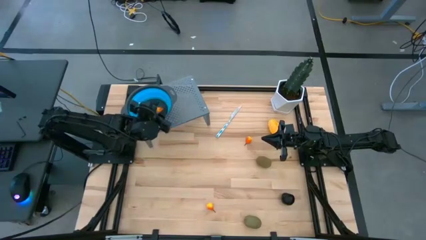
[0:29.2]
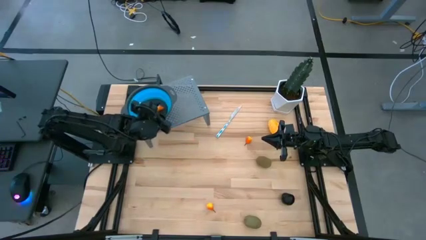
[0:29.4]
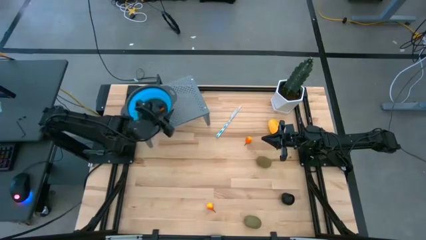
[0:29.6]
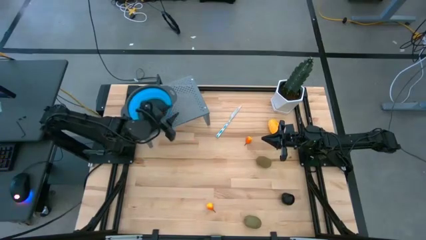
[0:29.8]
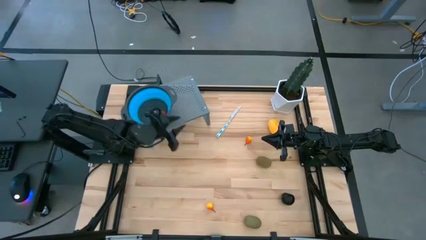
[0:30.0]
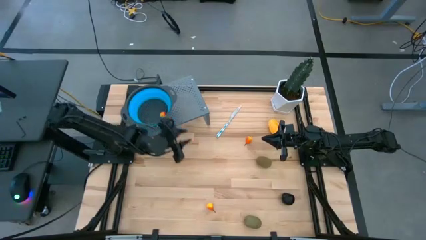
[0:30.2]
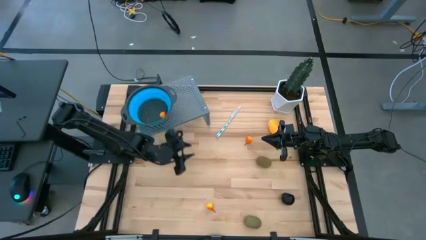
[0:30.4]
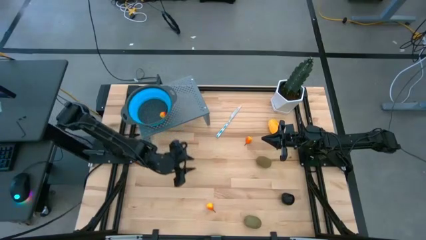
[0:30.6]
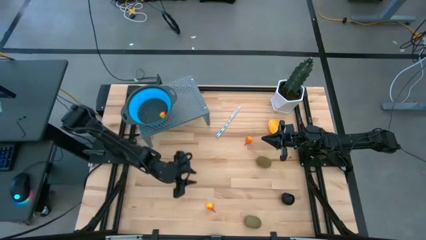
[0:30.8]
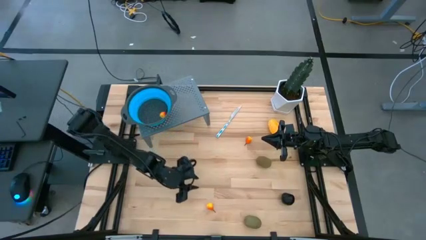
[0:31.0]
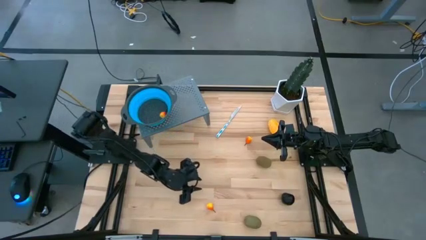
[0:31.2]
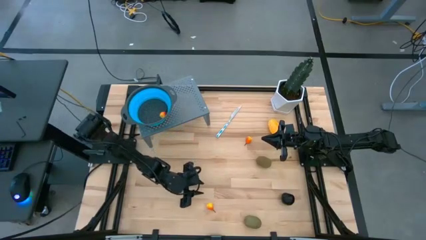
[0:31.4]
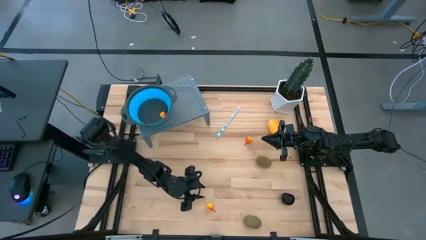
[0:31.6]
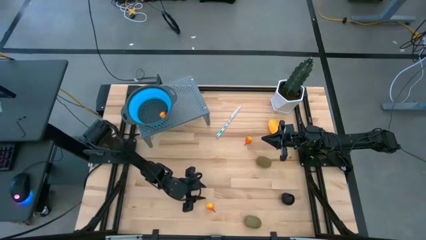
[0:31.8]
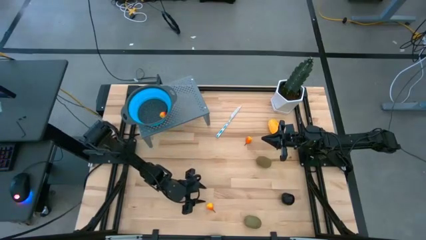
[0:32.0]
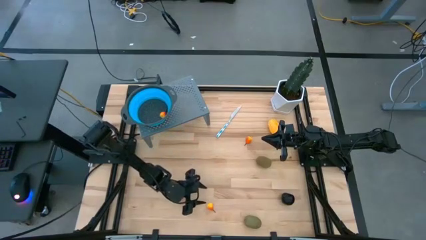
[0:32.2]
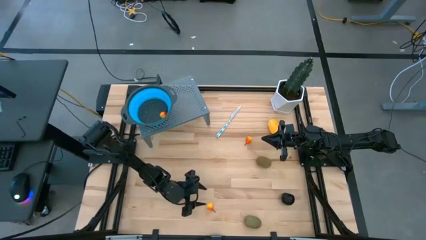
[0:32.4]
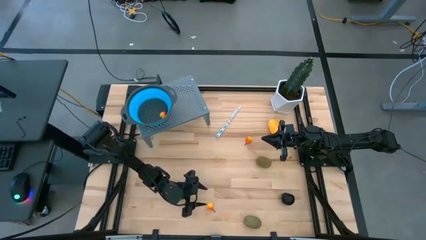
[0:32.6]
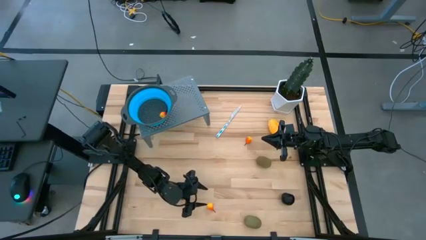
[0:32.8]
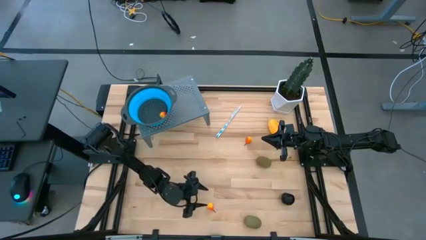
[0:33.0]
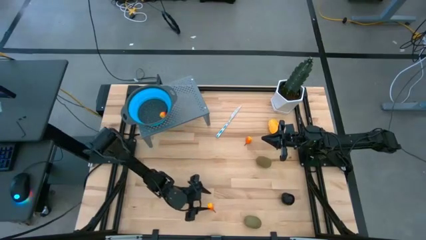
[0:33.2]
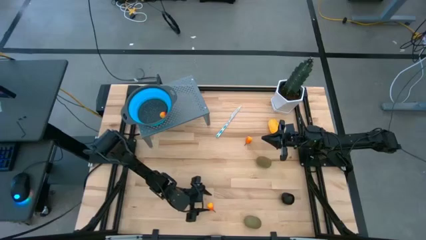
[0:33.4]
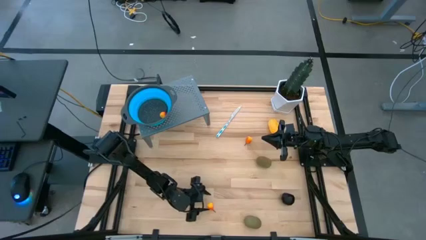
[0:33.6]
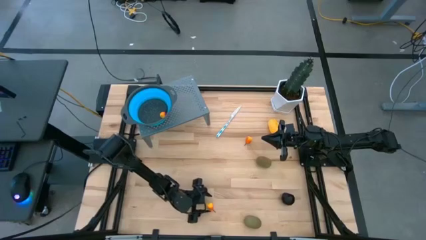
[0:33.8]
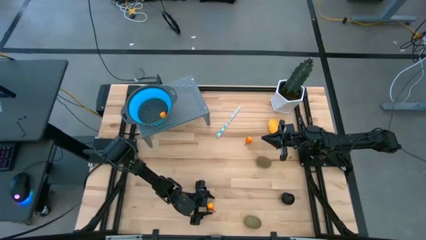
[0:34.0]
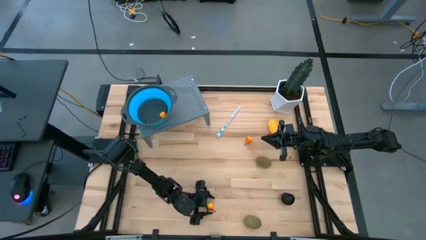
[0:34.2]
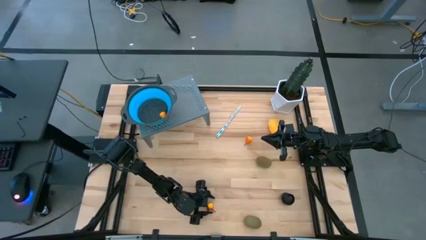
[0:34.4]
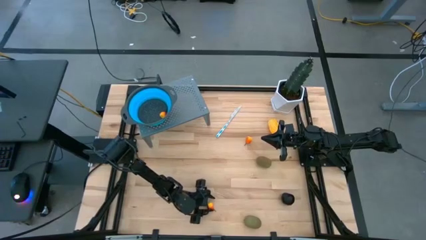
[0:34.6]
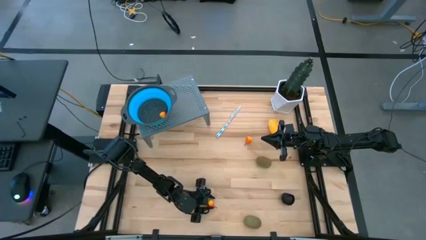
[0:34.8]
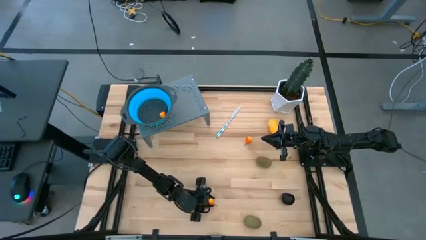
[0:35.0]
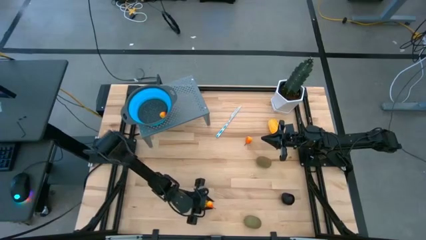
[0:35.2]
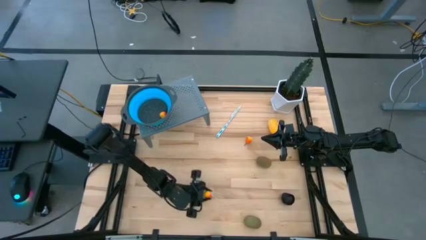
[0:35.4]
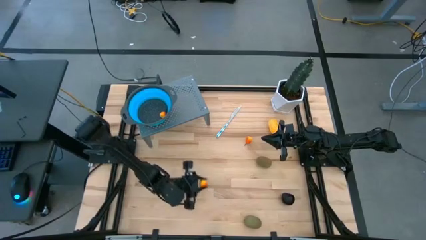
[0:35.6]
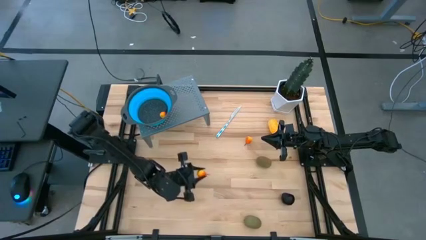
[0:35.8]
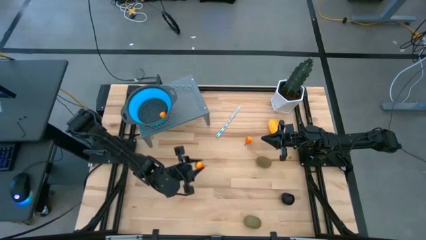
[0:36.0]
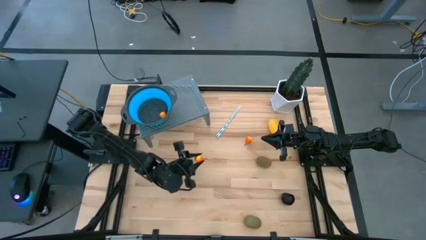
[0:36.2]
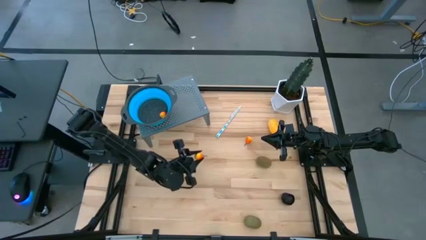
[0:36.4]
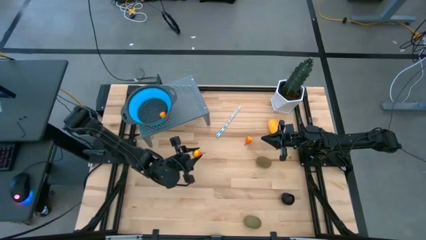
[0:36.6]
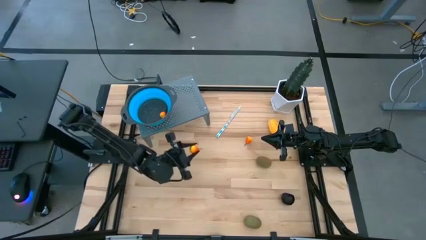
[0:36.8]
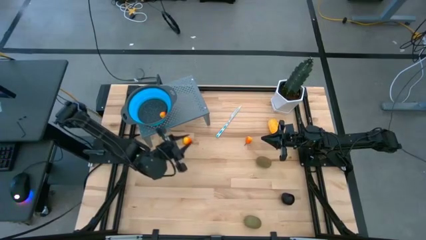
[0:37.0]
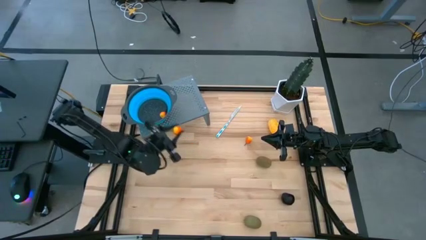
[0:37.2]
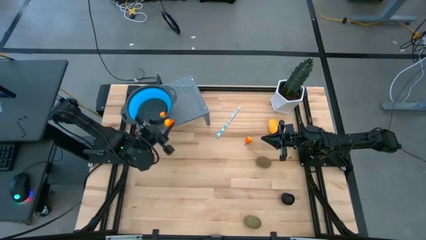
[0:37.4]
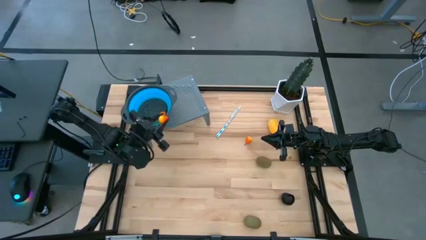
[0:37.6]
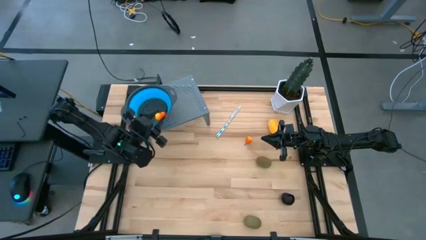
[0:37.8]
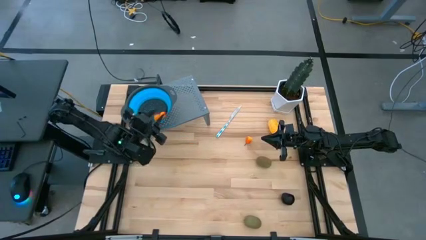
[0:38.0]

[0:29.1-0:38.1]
Task: Pick & Place Fruit
Put the bottom orange pear into the blue strainer bowl

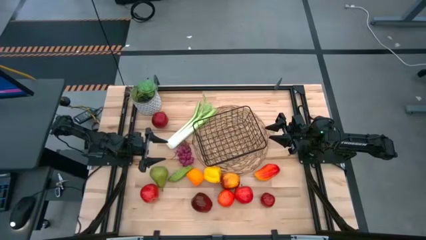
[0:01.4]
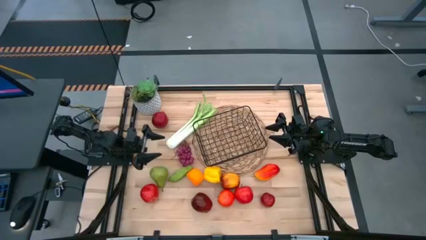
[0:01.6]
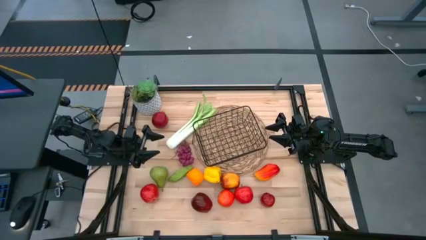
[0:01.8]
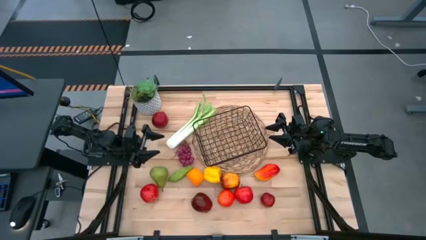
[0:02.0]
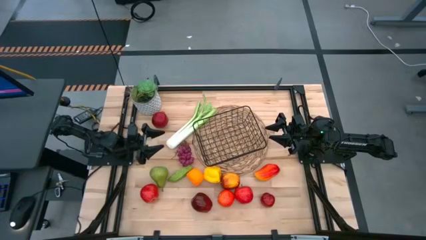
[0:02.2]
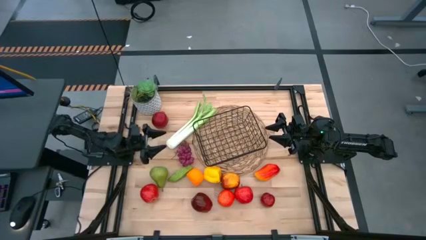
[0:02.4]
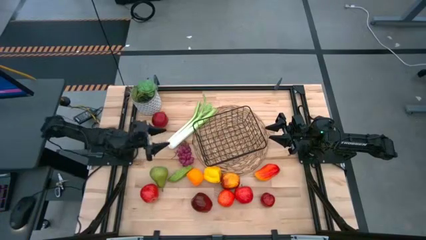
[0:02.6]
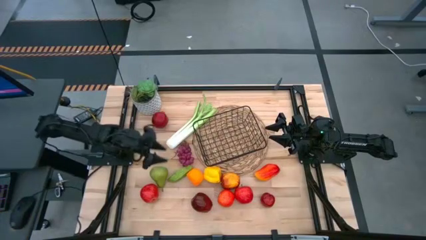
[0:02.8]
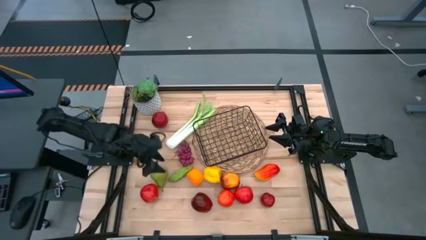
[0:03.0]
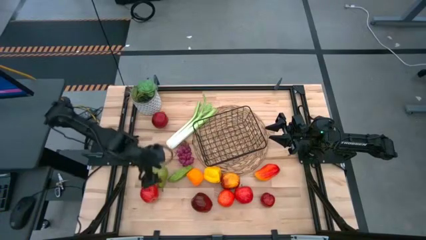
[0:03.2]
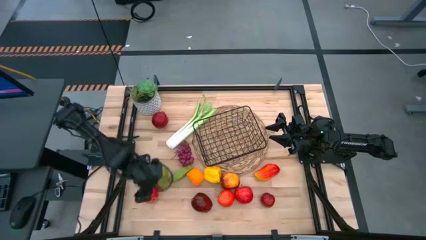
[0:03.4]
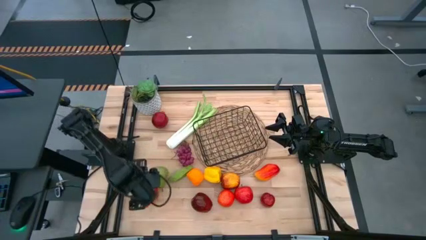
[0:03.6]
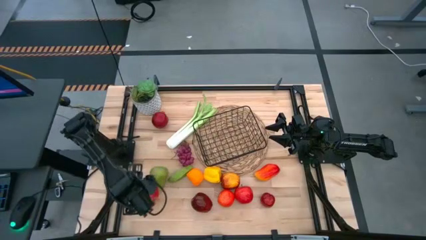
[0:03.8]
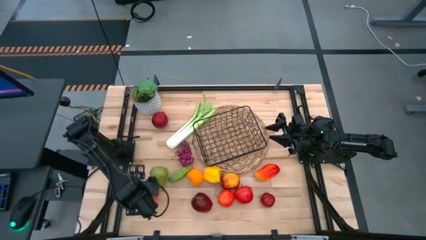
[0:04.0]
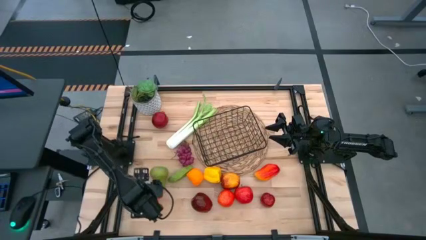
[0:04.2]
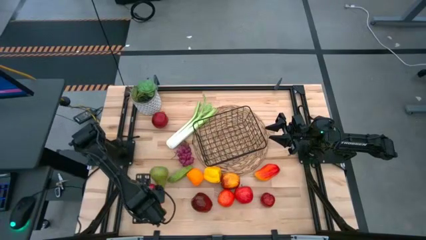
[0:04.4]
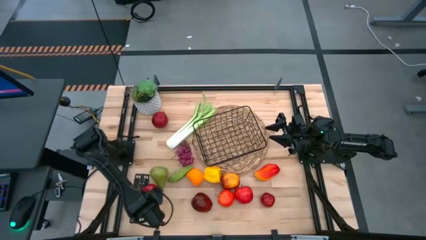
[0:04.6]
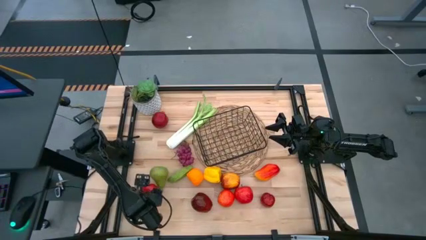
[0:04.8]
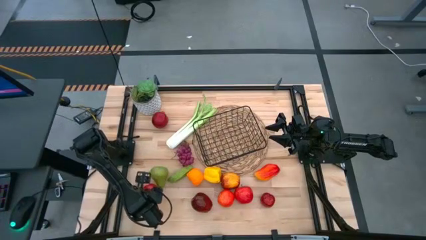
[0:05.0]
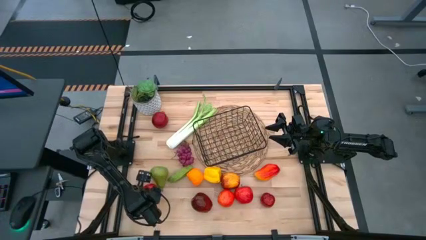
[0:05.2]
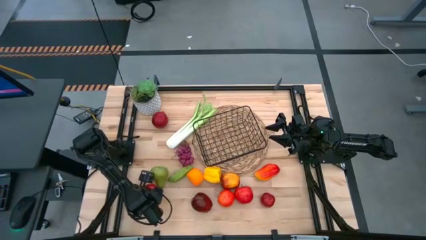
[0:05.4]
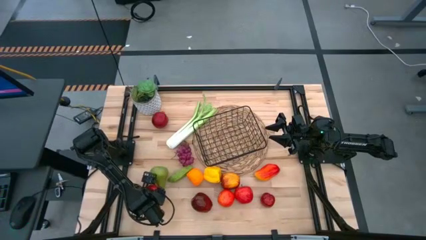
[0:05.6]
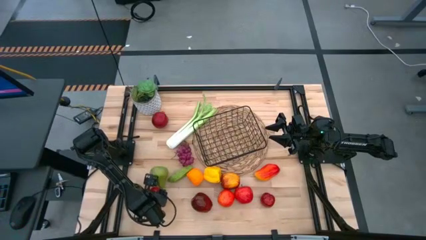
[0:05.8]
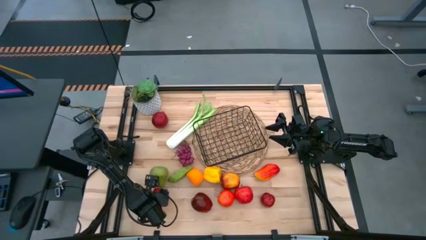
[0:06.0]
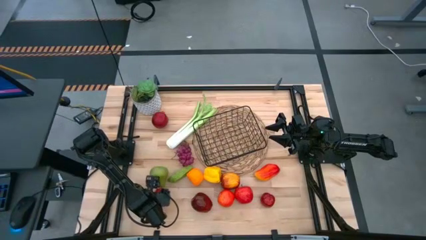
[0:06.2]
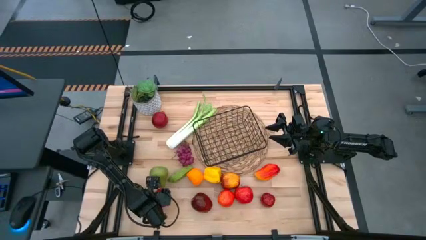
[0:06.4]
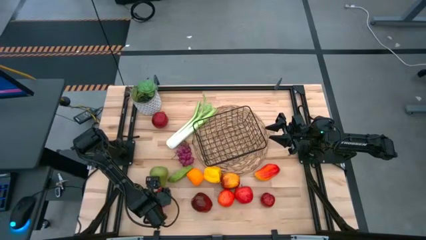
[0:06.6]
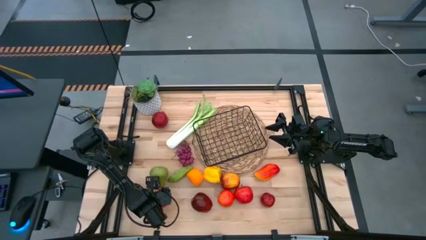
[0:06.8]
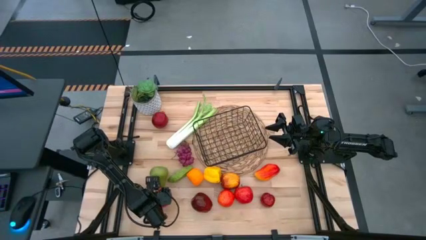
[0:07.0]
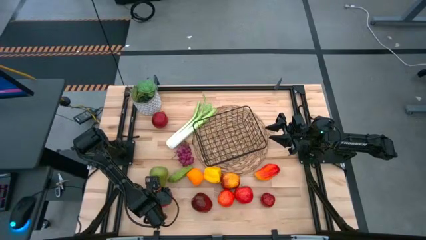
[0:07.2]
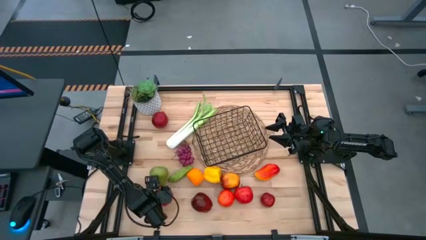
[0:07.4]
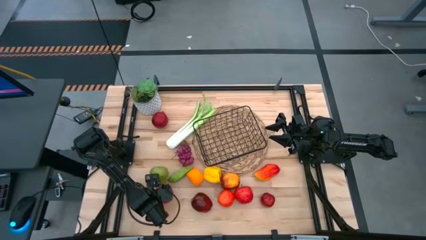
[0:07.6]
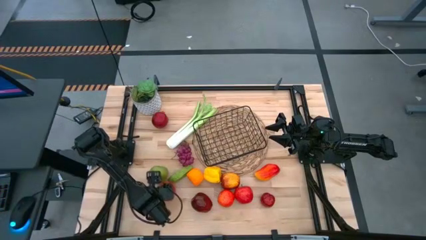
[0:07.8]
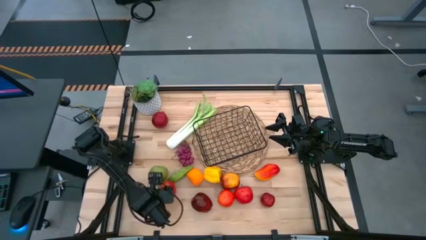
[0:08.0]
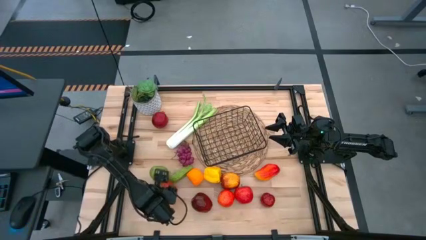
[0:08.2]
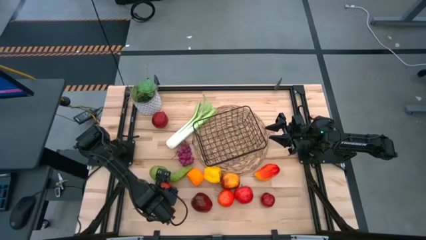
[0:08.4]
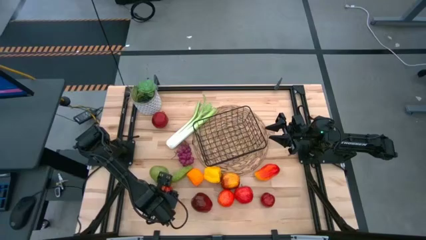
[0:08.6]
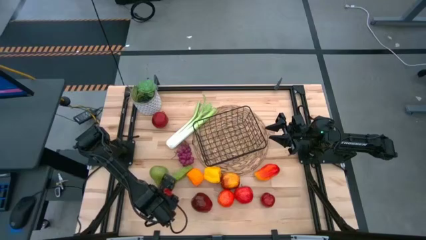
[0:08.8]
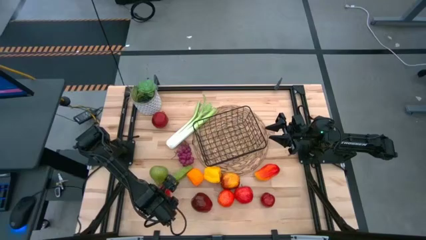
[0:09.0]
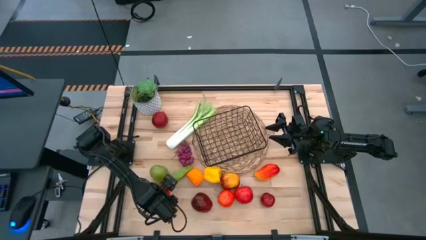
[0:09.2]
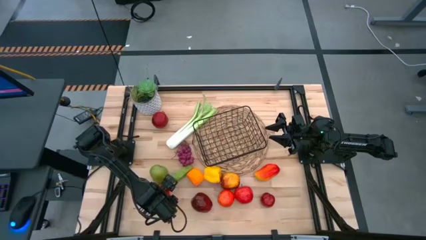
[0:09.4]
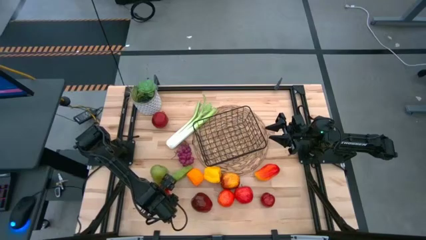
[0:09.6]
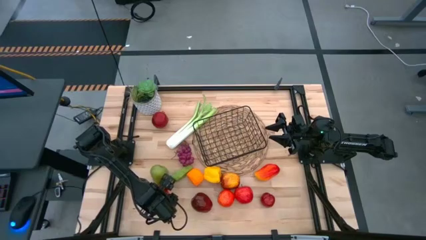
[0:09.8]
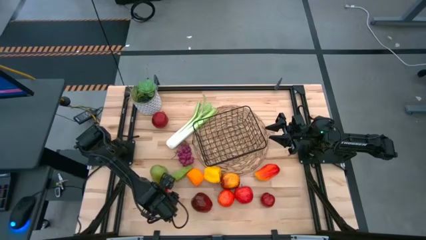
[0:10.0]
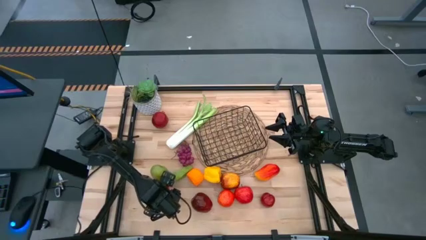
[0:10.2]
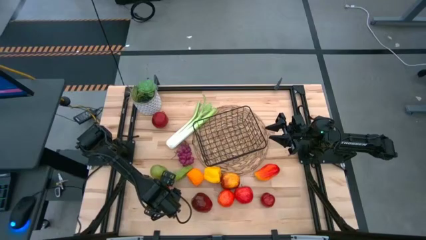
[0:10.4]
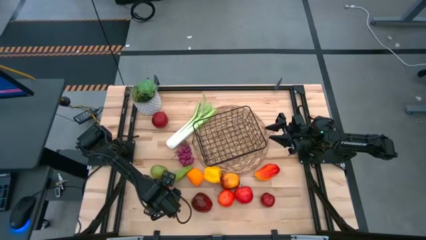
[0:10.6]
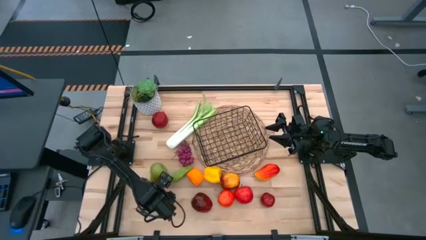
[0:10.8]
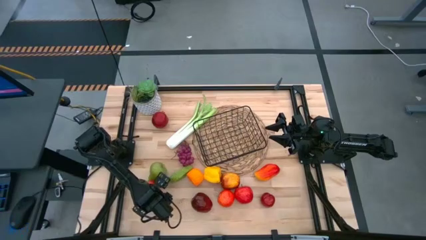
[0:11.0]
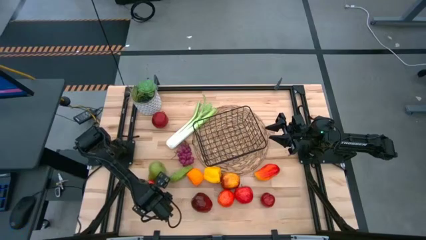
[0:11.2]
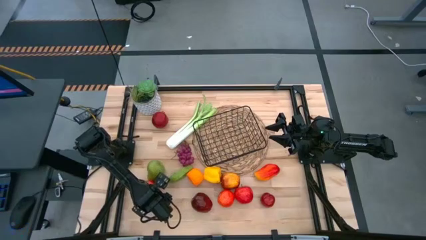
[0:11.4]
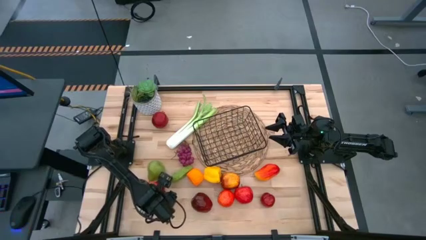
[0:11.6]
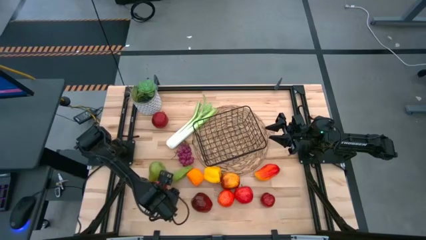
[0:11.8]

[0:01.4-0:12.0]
Task: Build produce basket
Put the red apple into the black wire basket
